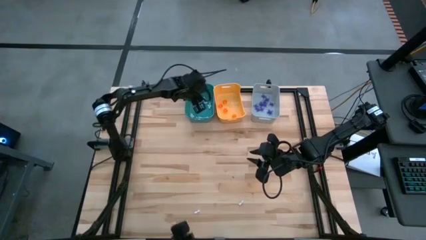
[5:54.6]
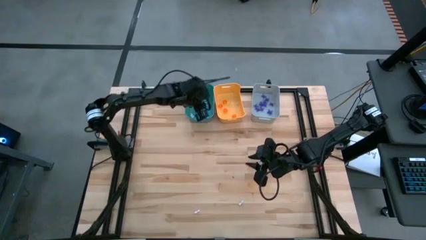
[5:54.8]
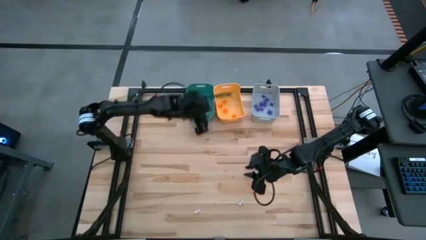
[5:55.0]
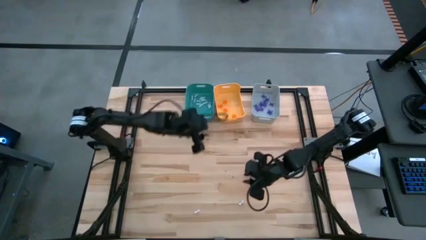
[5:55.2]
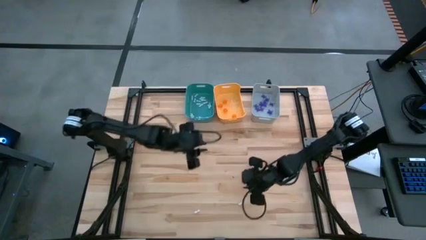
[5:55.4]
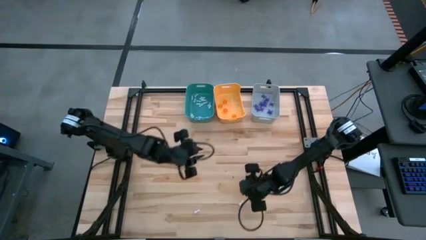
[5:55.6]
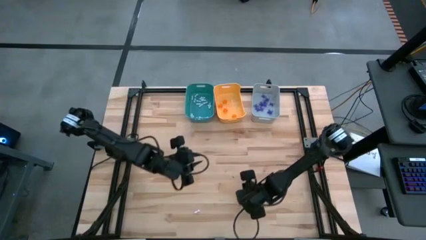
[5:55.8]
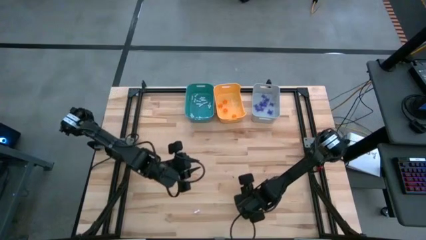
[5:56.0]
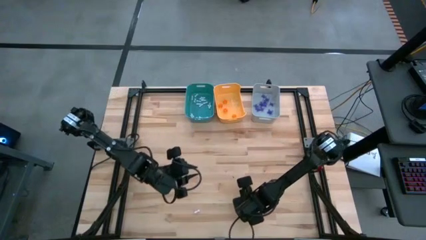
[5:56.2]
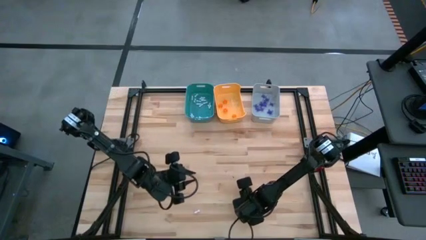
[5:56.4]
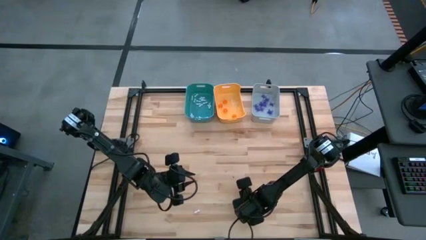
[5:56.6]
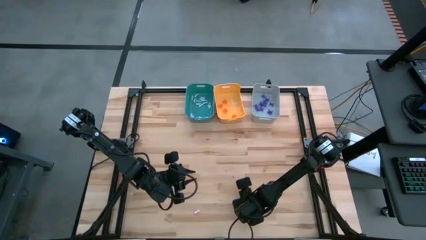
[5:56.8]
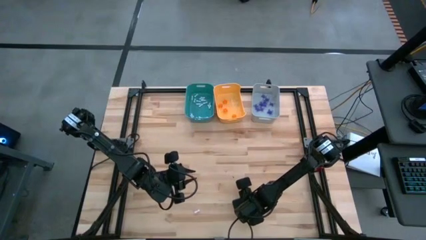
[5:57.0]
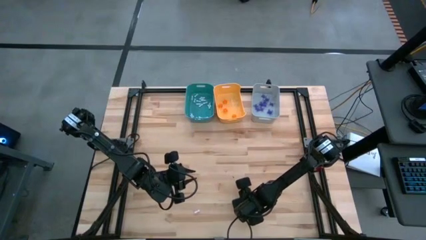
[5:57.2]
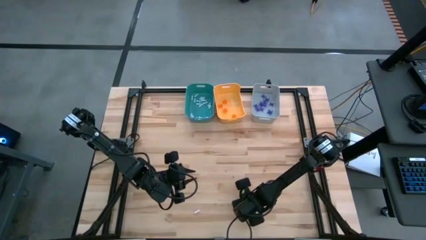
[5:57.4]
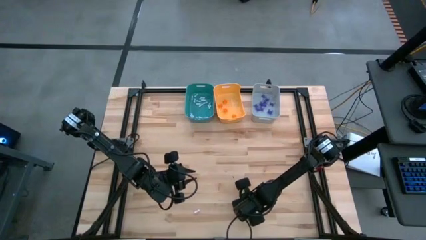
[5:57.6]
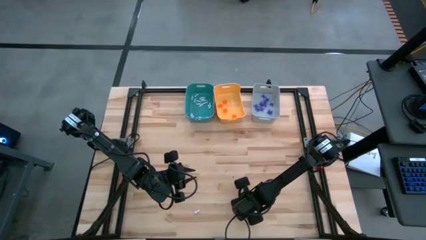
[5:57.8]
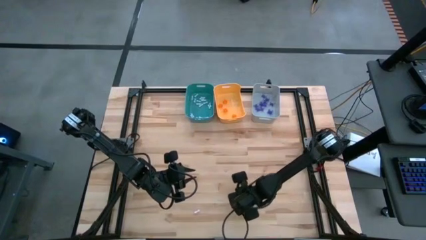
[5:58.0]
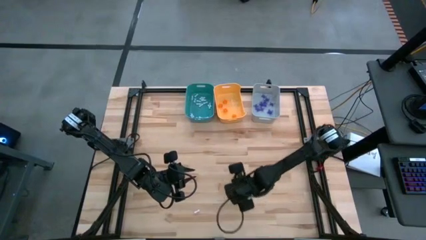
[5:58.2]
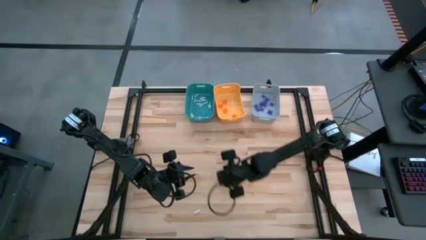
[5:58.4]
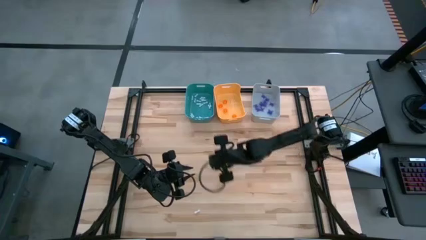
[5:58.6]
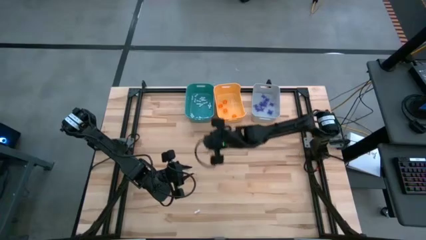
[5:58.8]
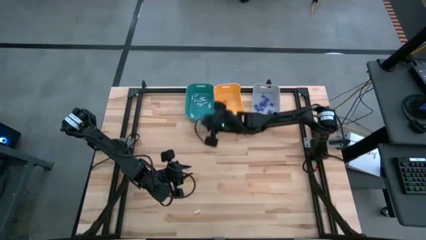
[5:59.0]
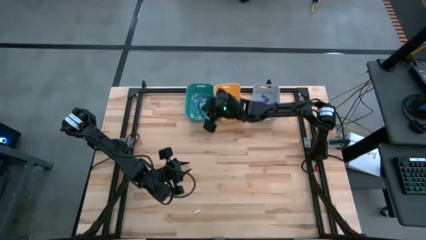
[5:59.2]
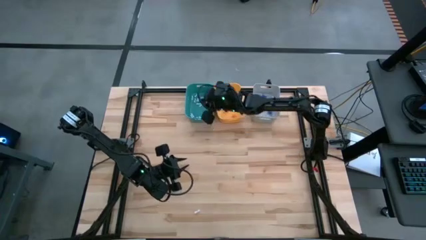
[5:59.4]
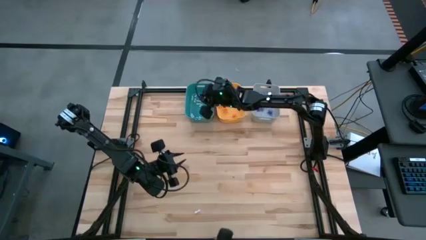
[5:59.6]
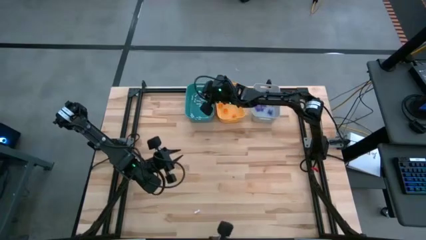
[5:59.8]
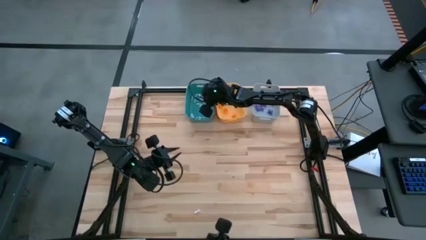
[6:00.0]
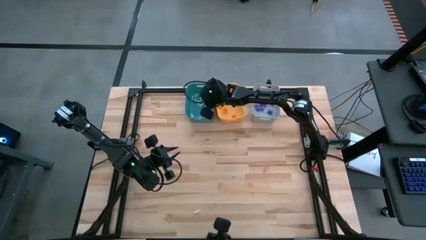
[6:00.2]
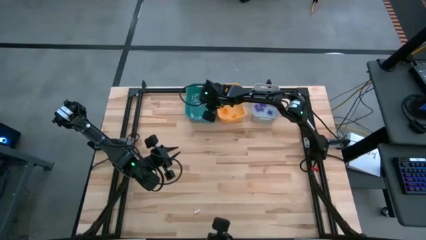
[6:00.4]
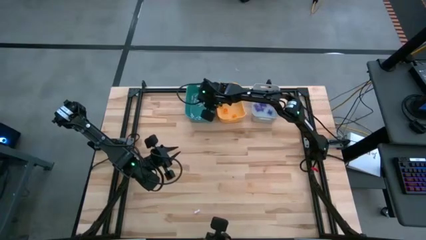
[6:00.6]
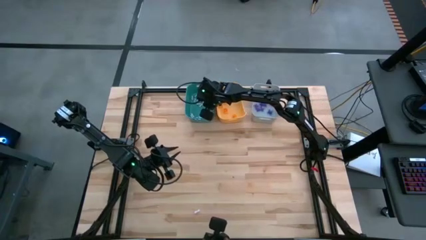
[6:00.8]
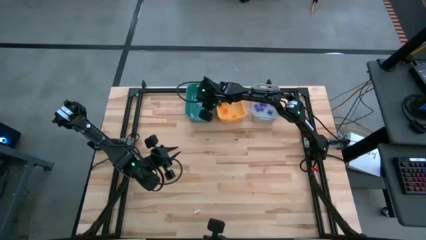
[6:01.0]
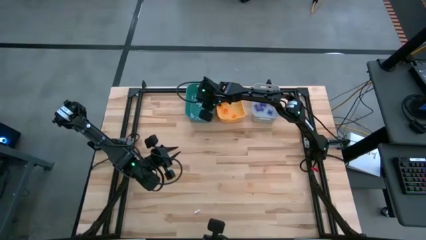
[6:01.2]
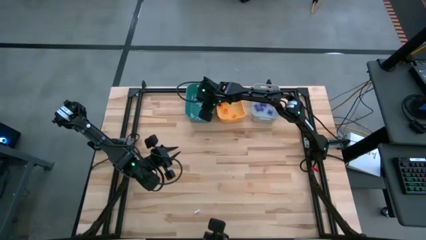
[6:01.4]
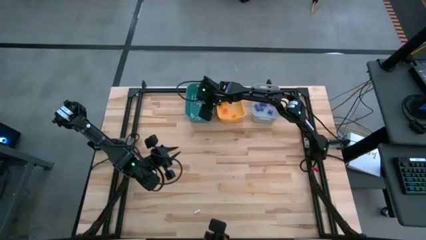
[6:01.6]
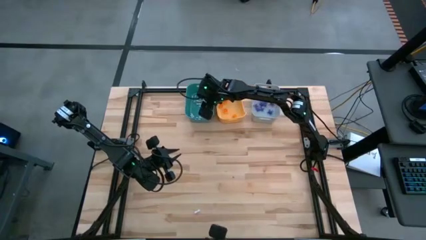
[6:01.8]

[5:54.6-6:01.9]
Task: Sort Halloween decoration
Put the white bone toy into the blue bin

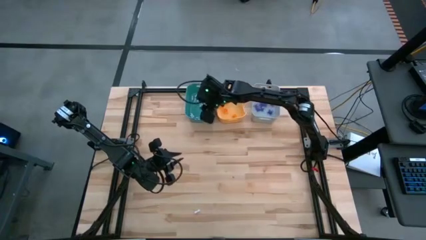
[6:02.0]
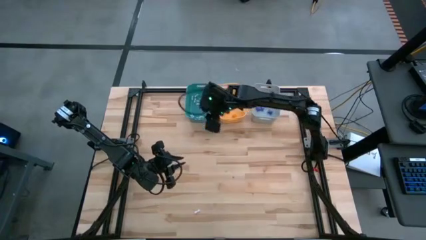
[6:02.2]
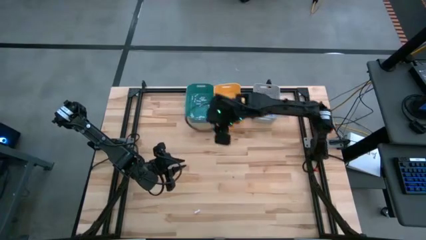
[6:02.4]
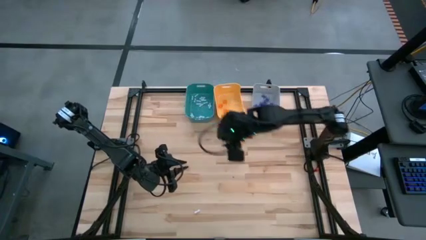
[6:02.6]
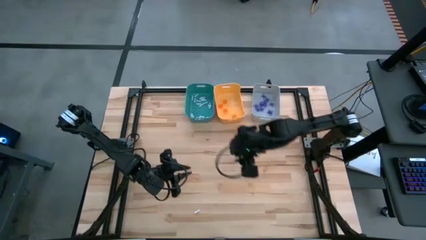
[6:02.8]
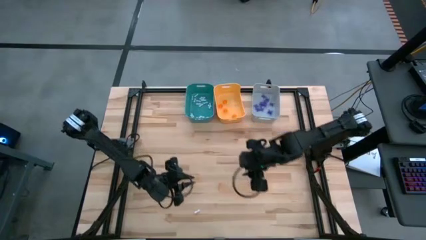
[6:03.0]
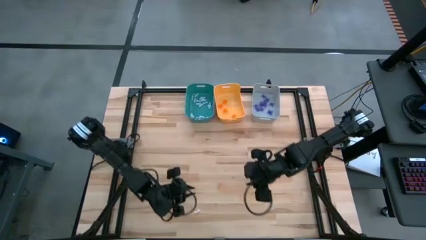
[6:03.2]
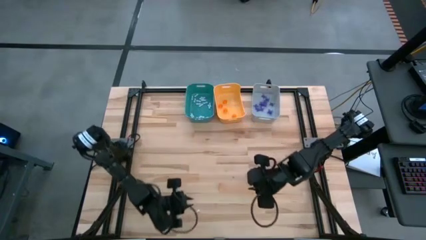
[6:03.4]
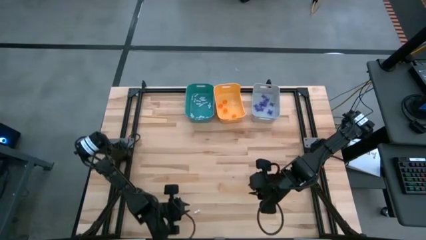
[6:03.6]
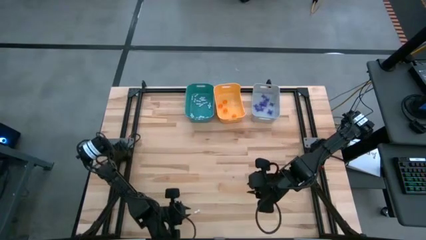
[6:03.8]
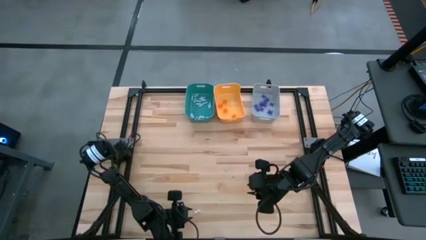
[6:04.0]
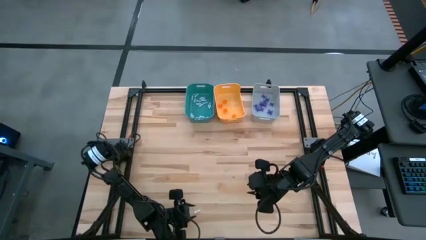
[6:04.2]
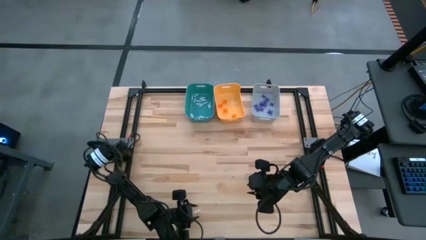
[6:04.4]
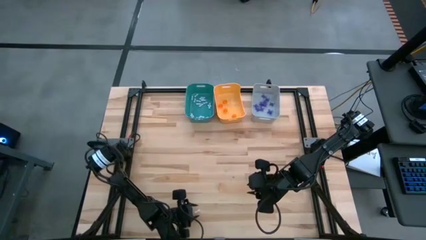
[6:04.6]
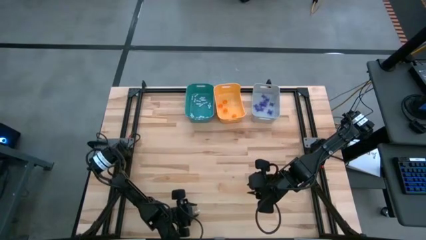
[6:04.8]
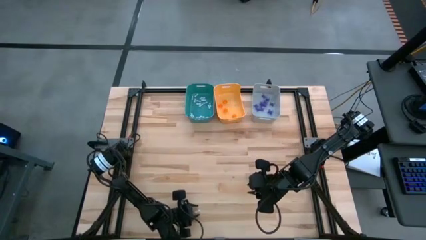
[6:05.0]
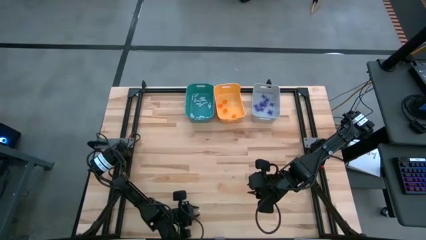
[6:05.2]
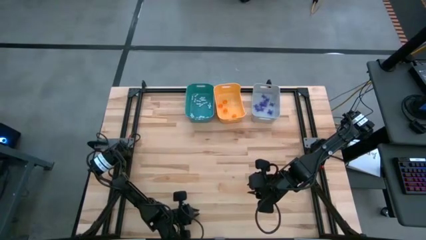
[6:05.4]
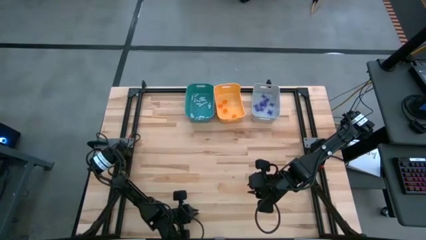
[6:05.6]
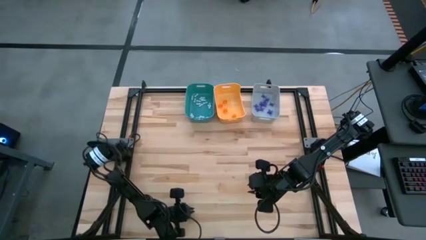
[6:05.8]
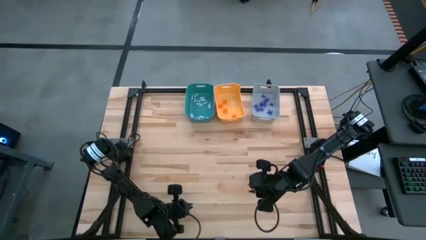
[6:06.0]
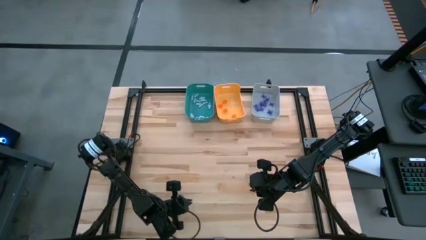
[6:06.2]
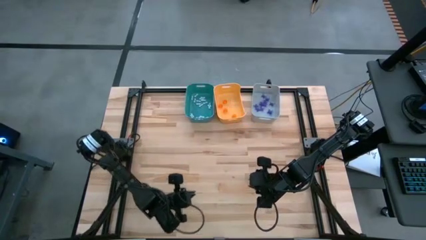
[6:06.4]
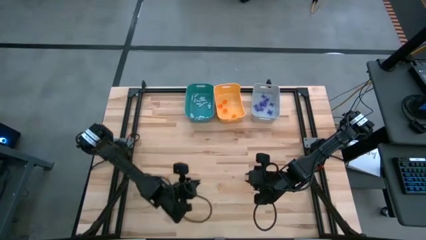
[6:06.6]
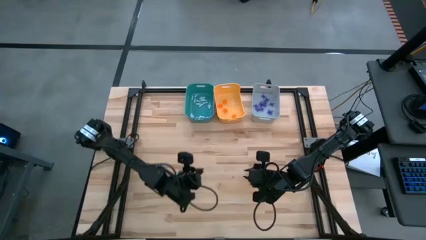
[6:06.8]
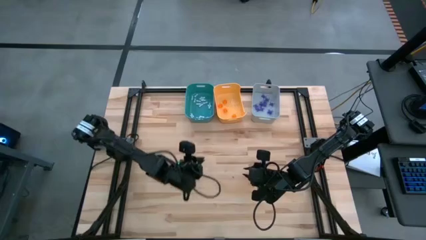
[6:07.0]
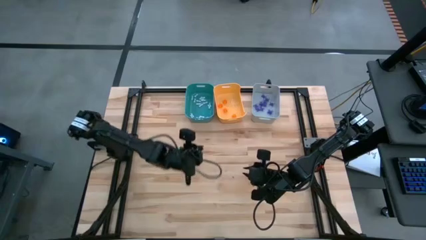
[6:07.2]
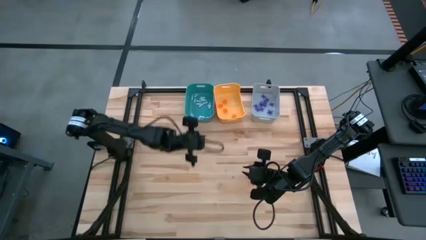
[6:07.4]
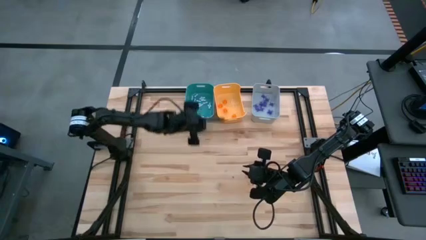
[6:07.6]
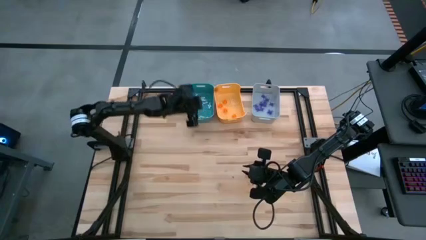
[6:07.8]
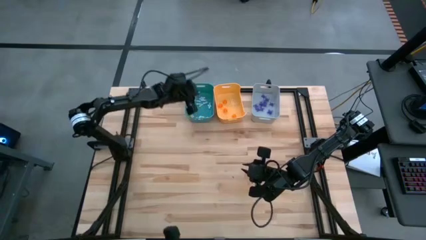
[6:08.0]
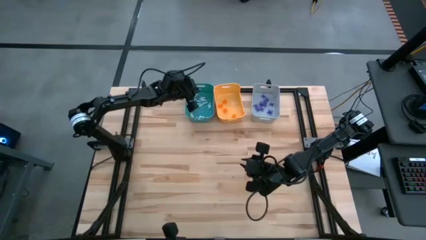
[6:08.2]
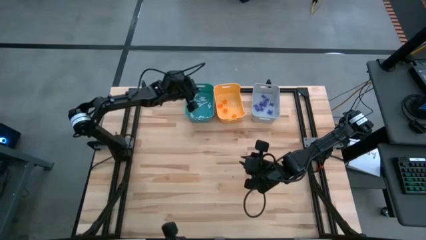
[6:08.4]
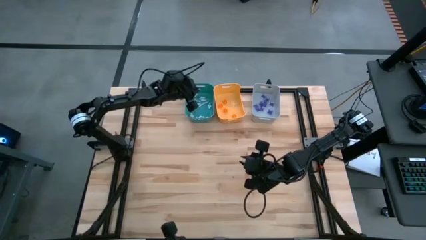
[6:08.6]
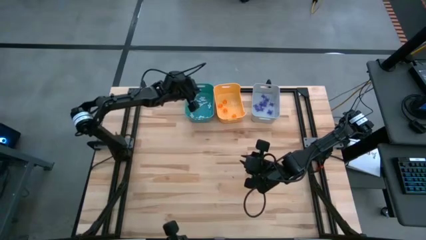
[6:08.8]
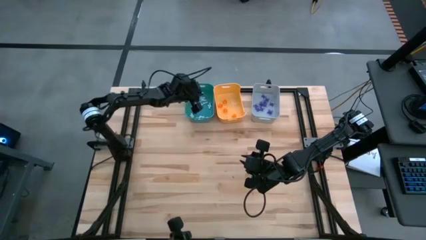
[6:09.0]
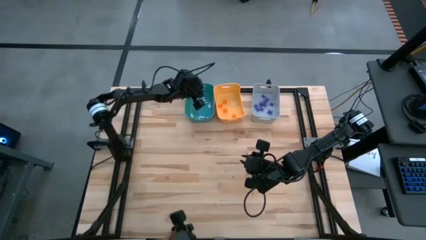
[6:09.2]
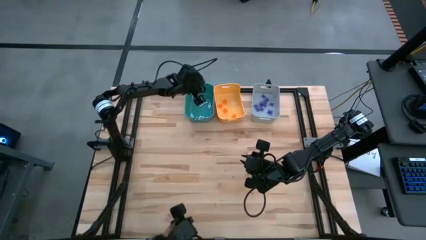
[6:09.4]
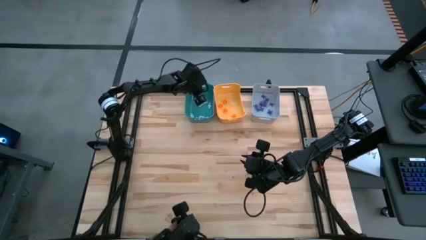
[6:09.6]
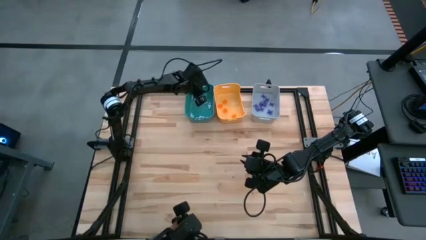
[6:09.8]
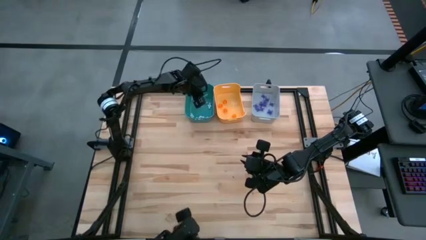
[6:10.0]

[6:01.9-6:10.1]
Put the white bone toy into the blue bin
